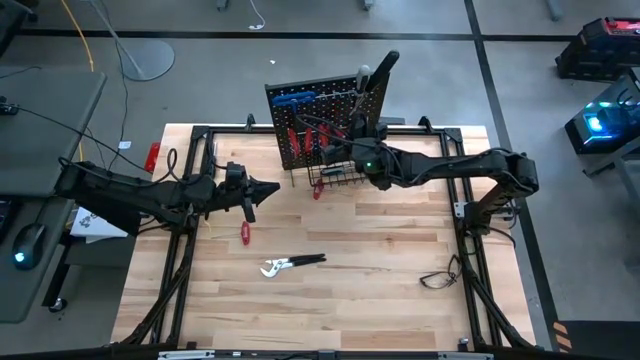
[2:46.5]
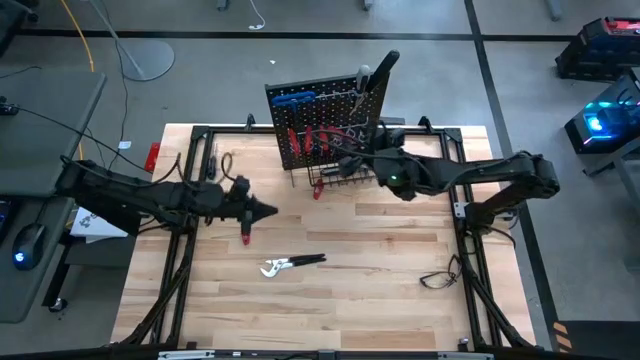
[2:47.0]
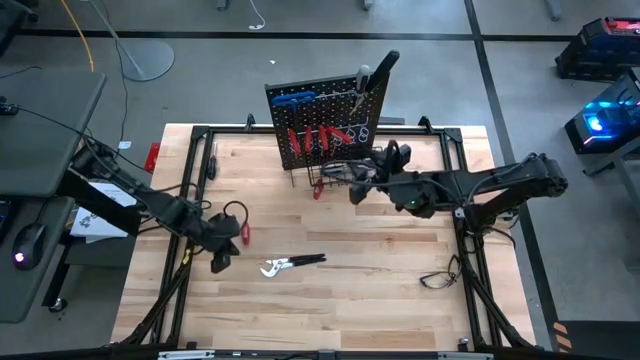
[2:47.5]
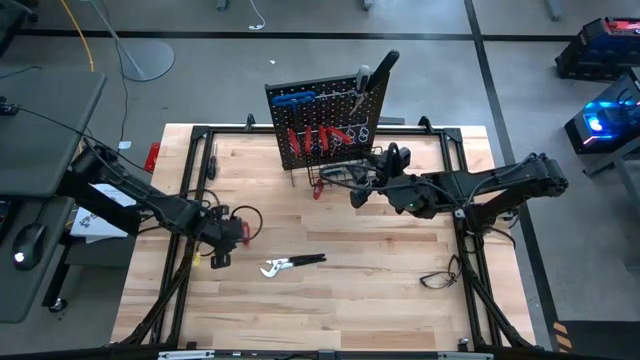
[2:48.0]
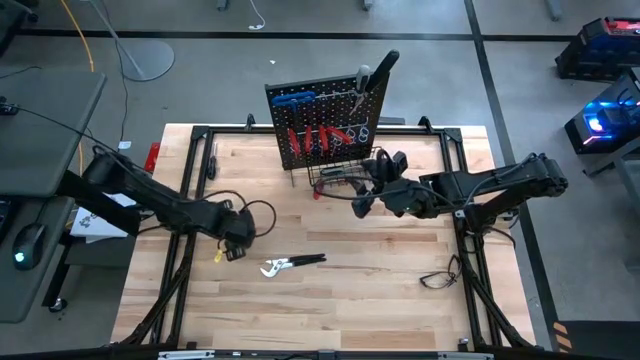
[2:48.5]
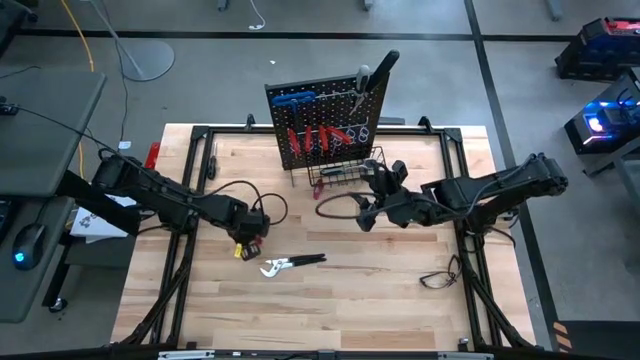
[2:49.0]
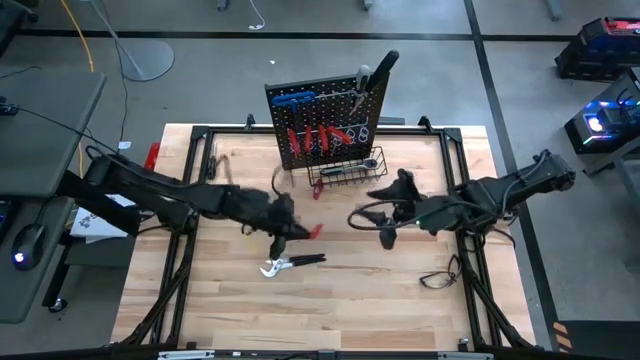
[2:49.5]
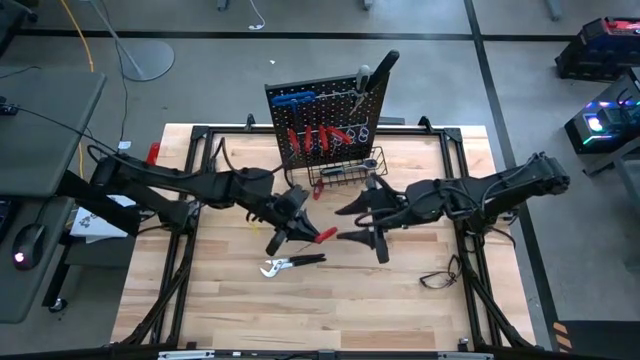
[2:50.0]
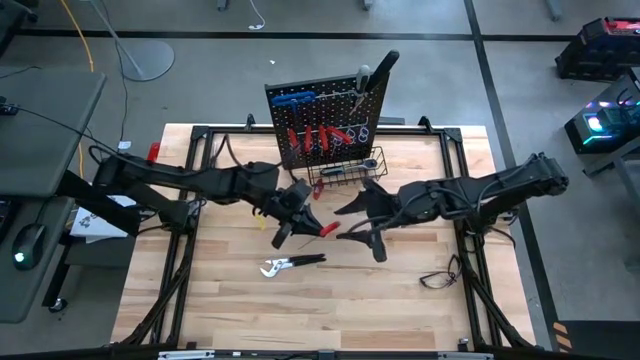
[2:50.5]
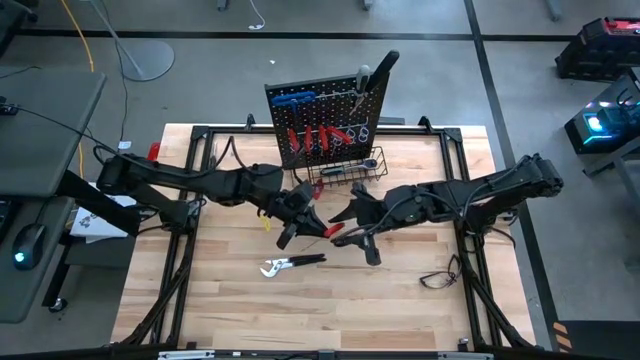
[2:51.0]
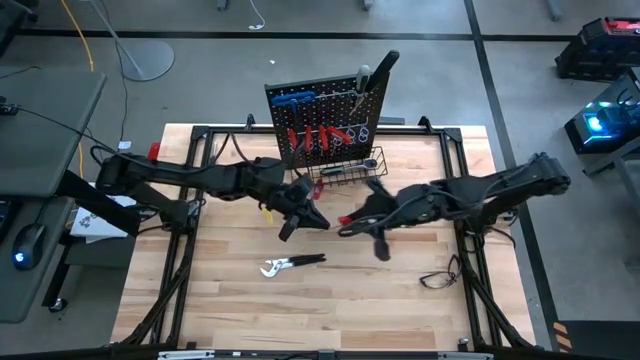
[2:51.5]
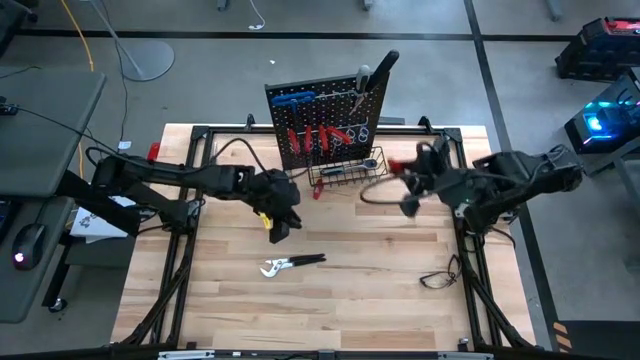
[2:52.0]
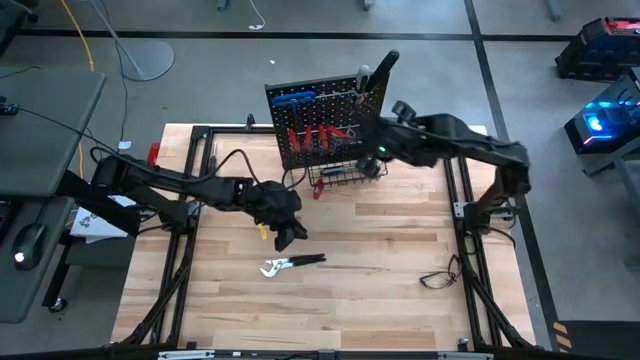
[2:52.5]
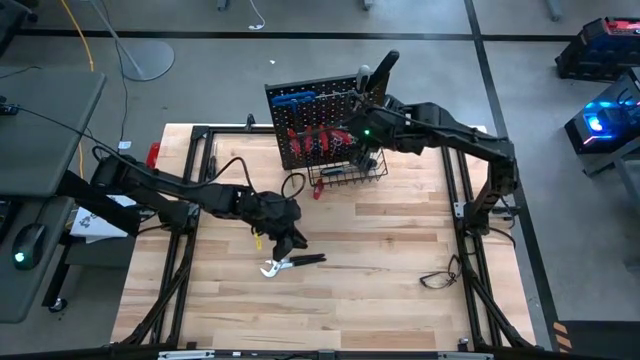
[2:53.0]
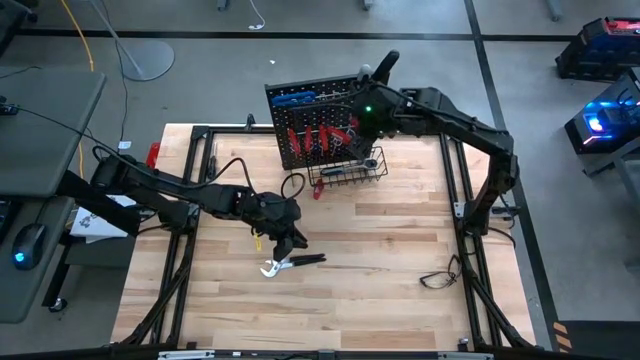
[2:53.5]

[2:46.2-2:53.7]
Task: Hang tools onto peg board
Hang the red allen wrench on the peg board

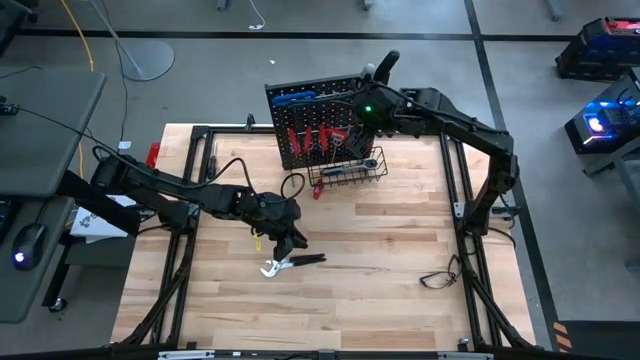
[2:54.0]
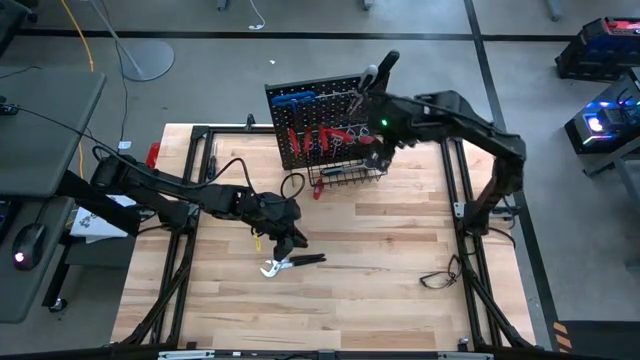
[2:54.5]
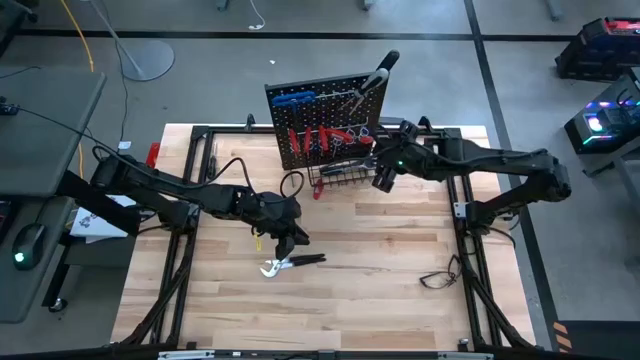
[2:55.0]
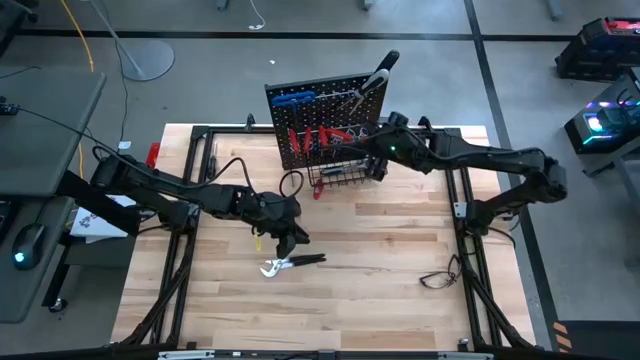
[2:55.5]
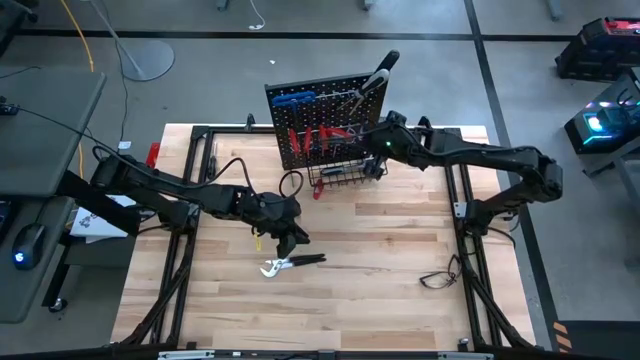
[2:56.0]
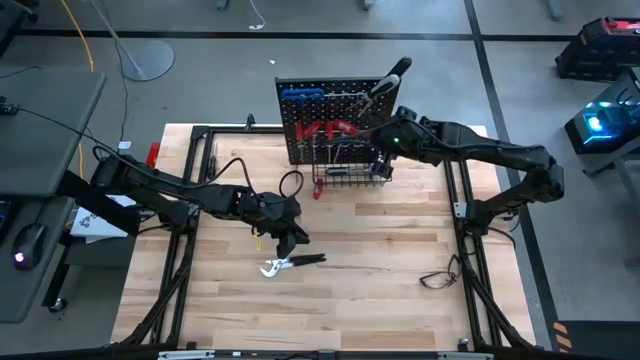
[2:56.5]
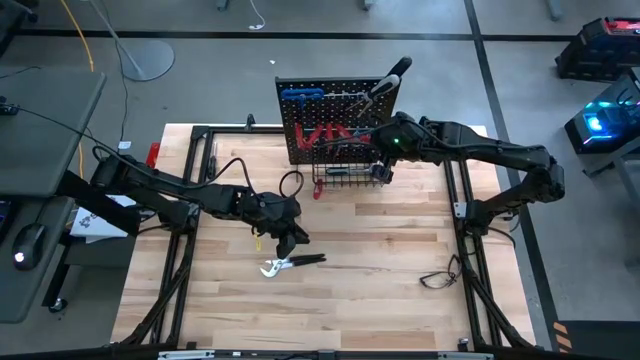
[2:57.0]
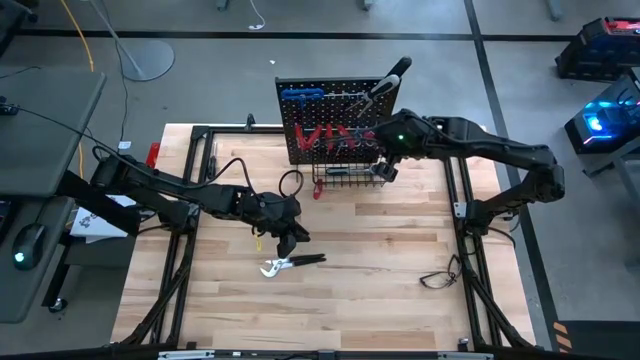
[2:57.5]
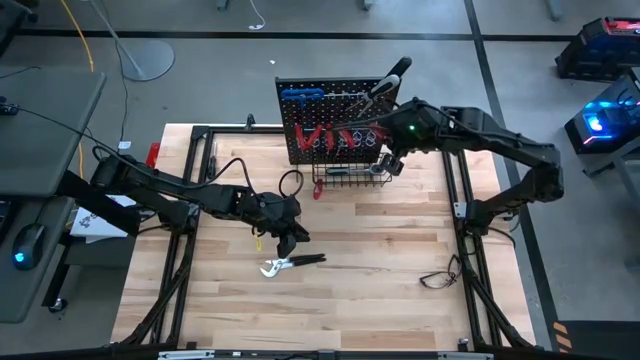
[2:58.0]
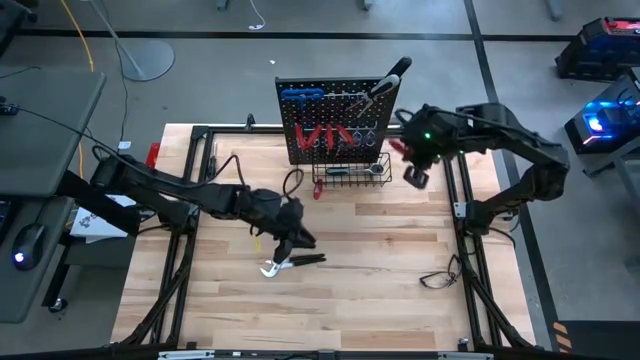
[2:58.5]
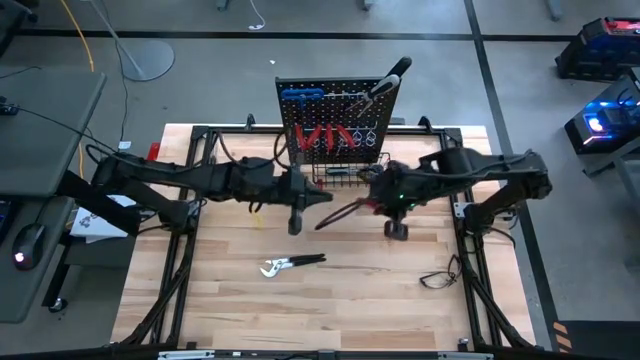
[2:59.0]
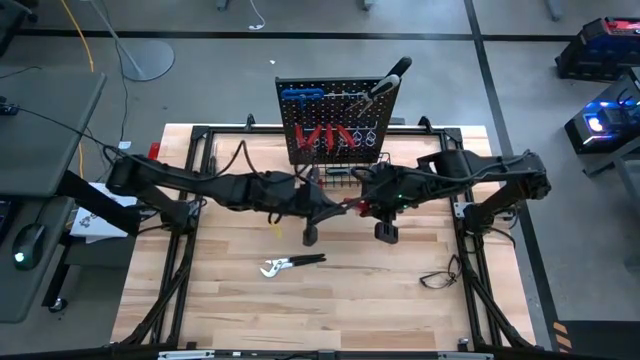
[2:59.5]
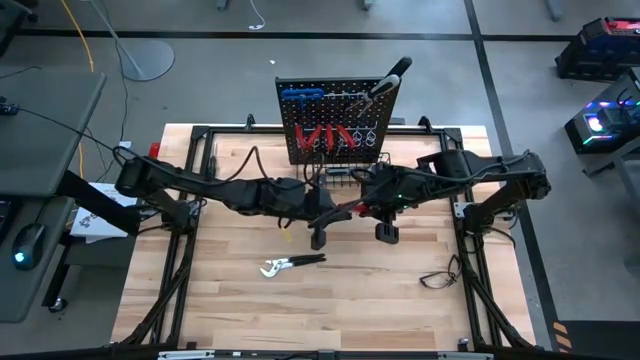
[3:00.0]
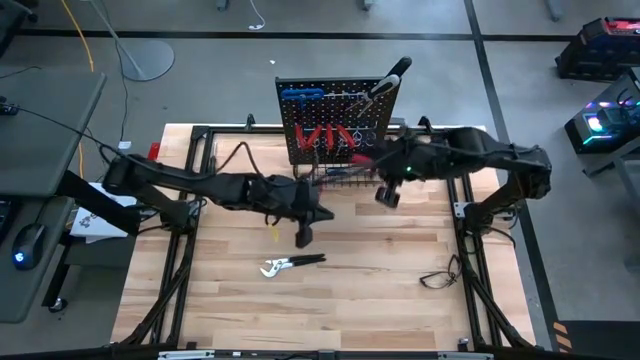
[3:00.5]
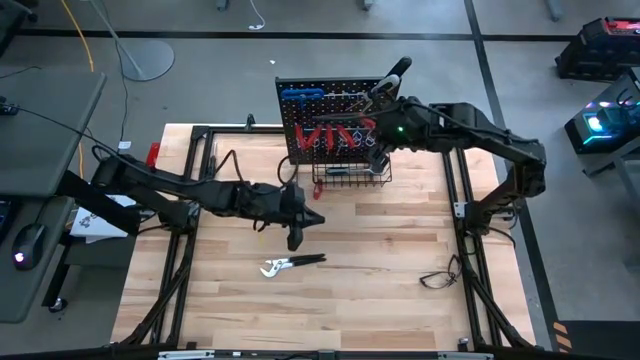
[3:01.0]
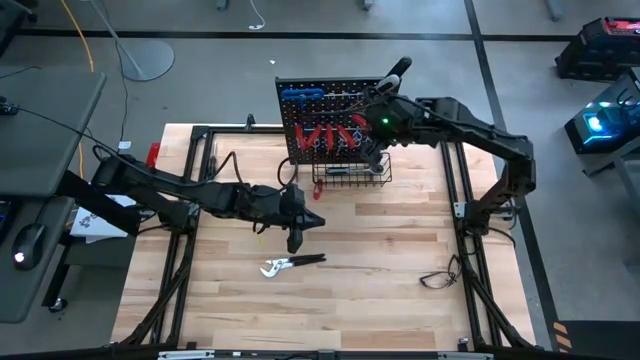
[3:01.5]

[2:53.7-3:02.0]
Hang the red allen wrench on the peg board

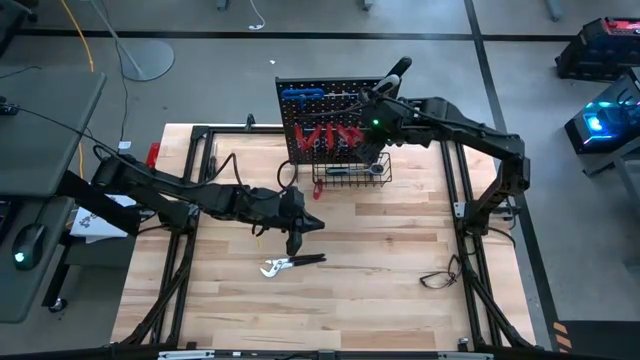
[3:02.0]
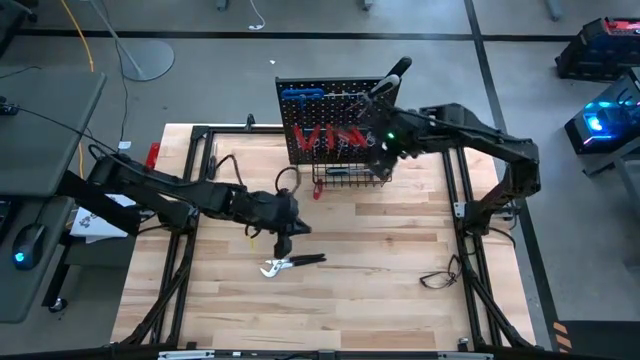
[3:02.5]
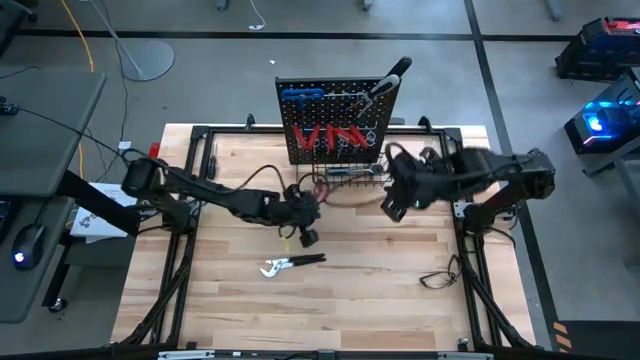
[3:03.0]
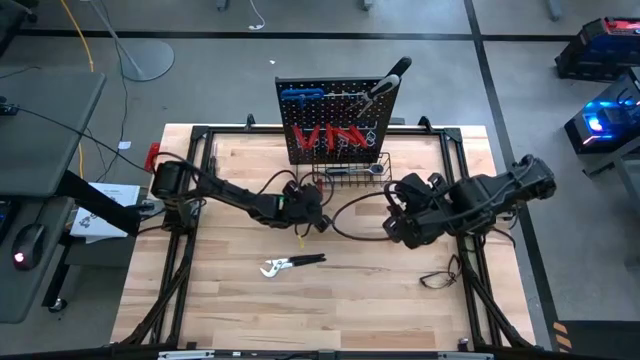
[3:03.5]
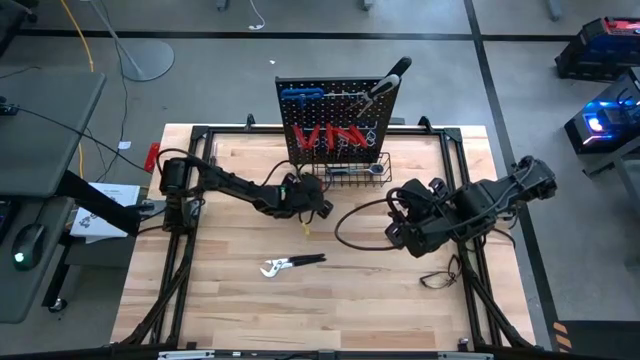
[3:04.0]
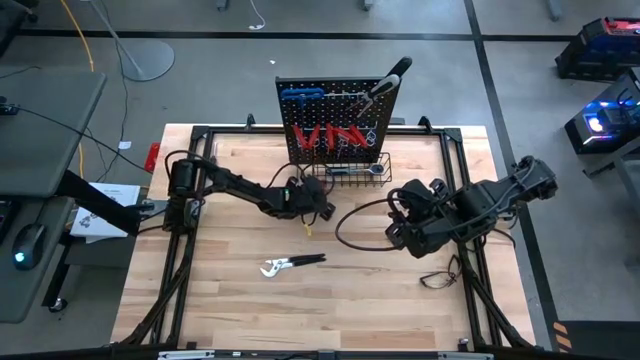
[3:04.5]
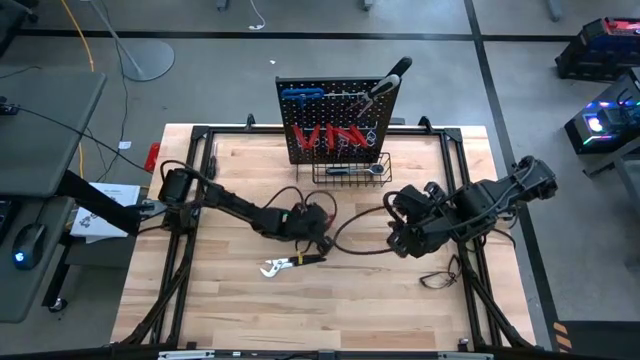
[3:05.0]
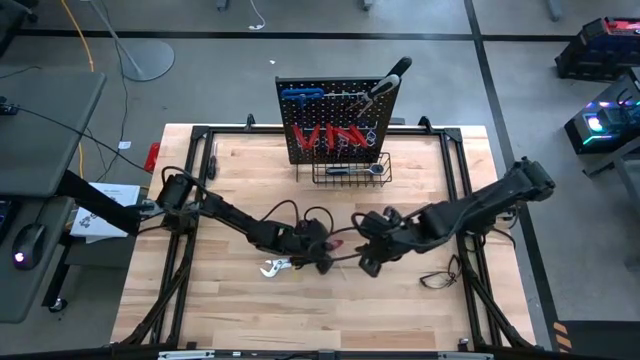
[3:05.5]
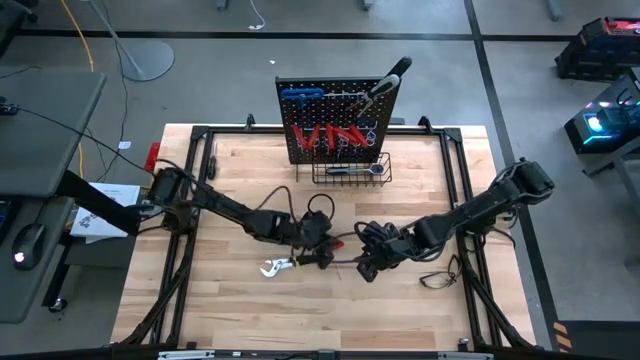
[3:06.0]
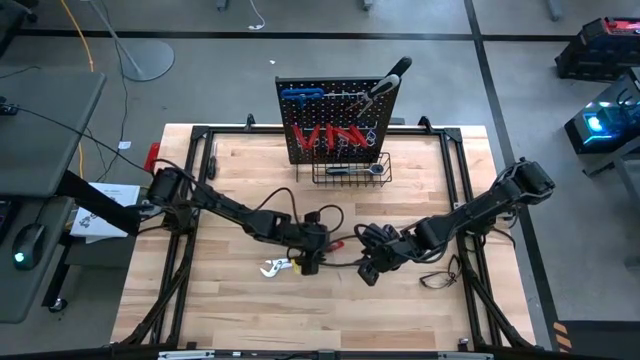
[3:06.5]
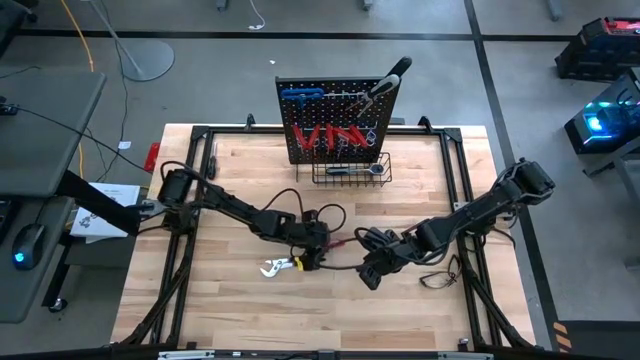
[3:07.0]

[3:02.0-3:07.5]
Hang the red allen wrench on the peg board

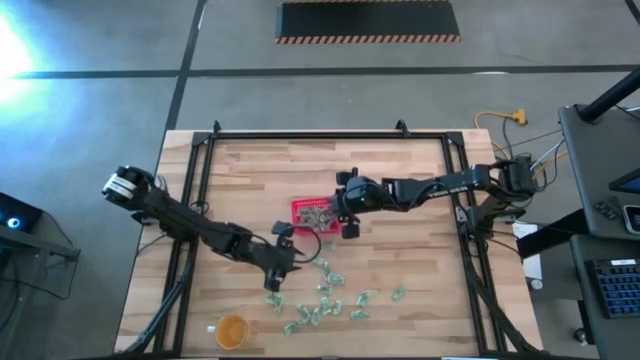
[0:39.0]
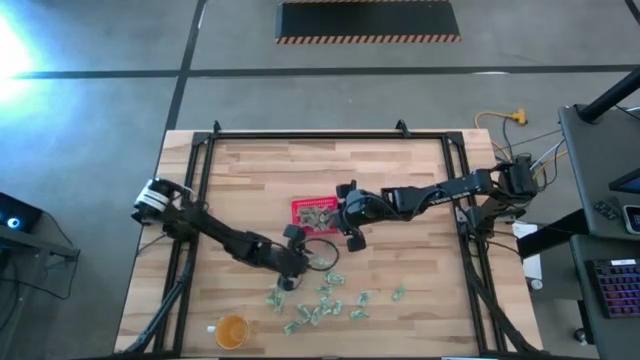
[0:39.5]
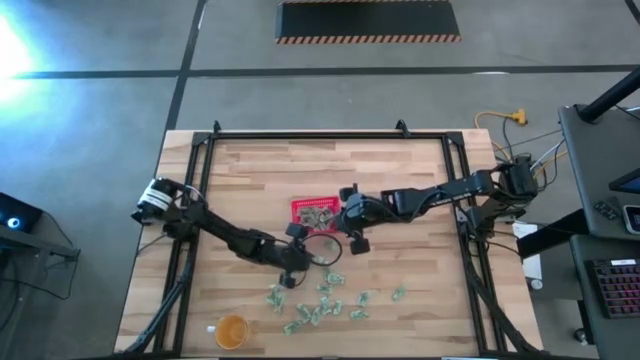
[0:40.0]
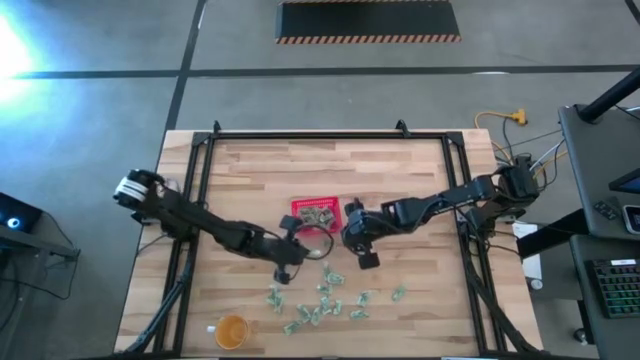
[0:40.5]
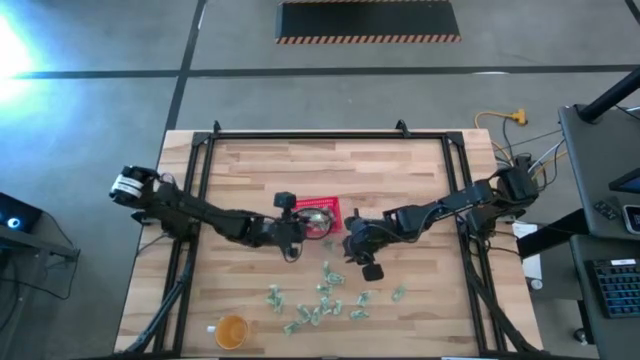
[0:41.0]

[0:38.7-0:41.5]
Task: Pick and place items into bin
Put the stevia packet into the red bin
